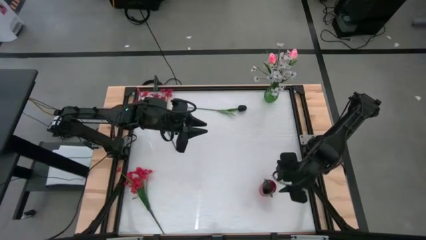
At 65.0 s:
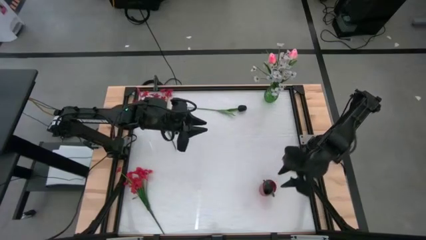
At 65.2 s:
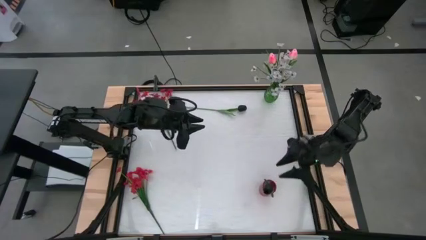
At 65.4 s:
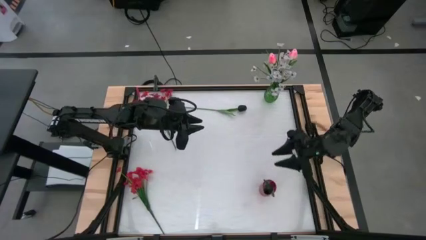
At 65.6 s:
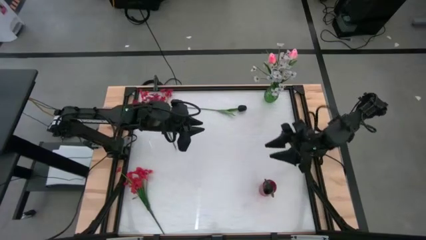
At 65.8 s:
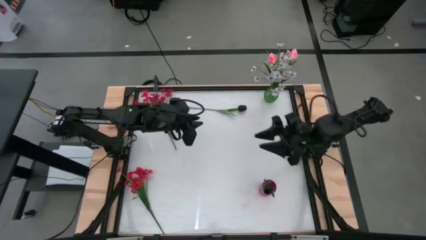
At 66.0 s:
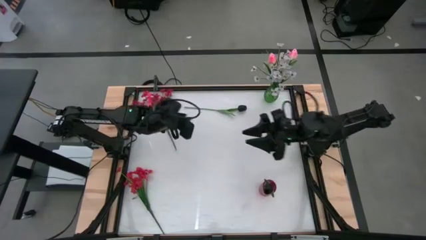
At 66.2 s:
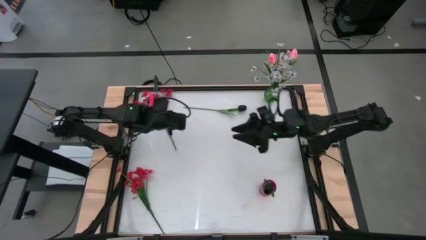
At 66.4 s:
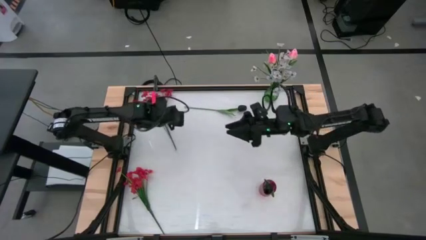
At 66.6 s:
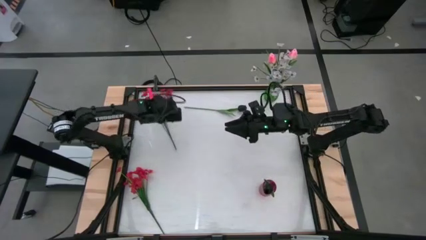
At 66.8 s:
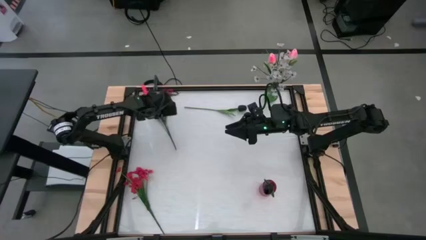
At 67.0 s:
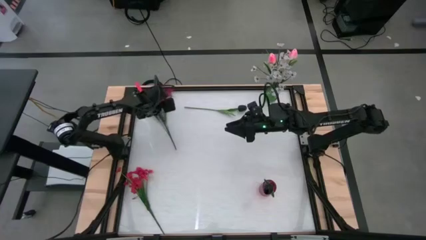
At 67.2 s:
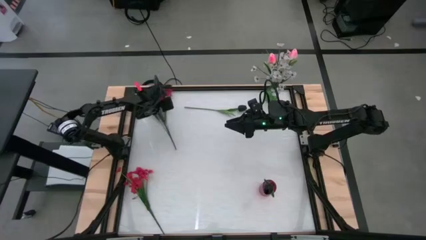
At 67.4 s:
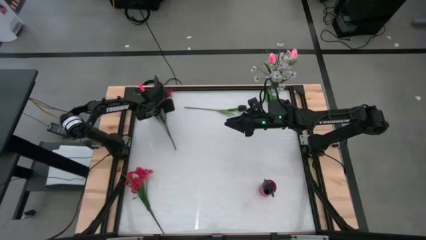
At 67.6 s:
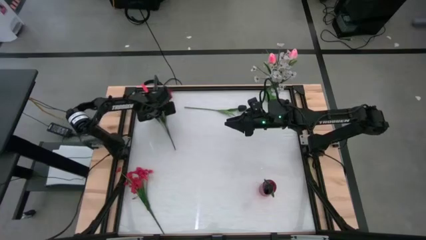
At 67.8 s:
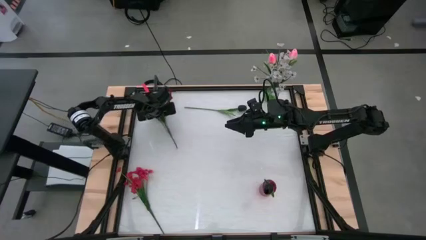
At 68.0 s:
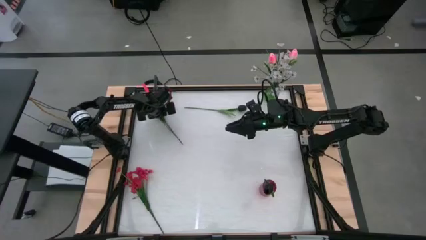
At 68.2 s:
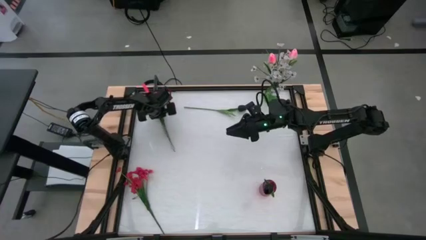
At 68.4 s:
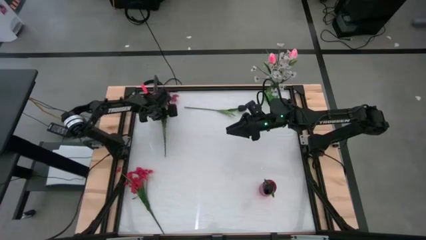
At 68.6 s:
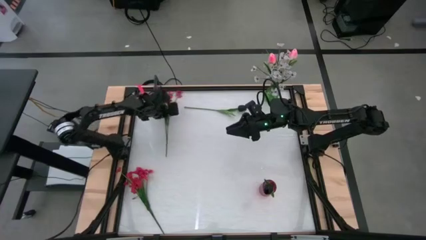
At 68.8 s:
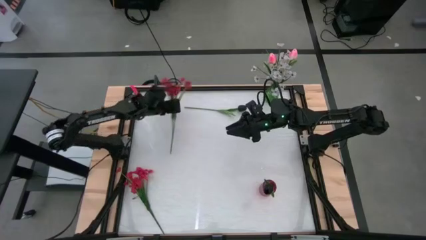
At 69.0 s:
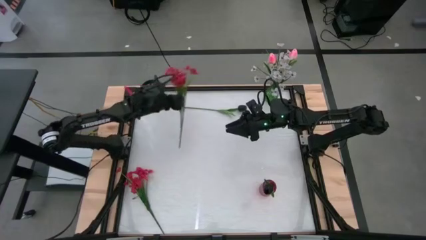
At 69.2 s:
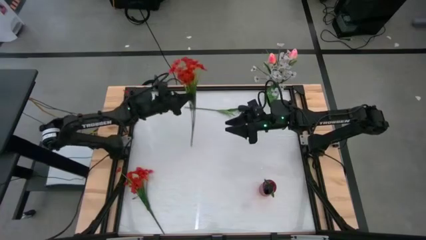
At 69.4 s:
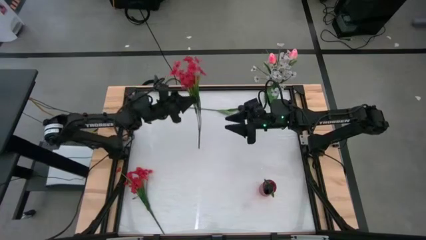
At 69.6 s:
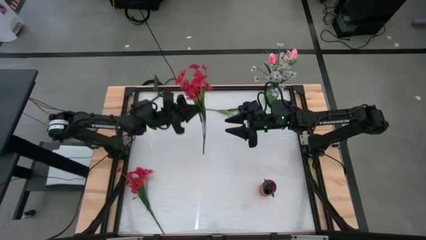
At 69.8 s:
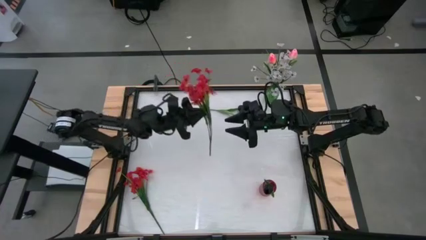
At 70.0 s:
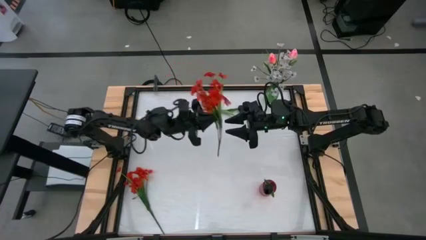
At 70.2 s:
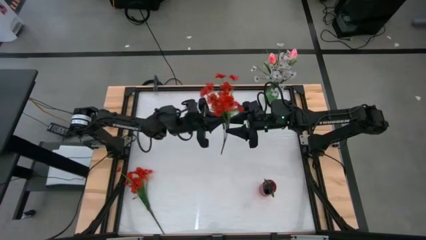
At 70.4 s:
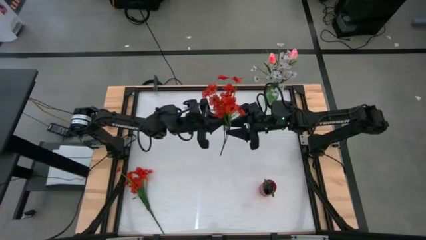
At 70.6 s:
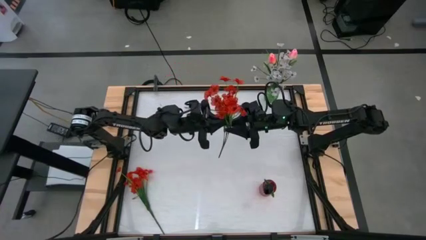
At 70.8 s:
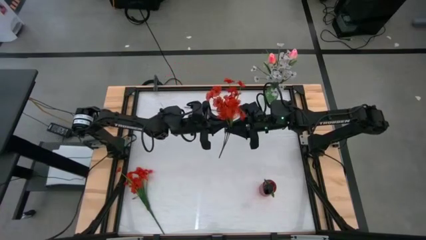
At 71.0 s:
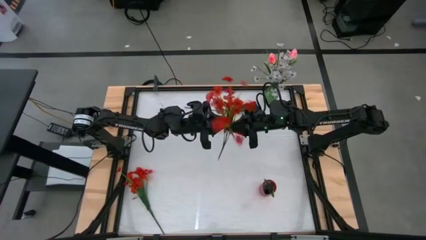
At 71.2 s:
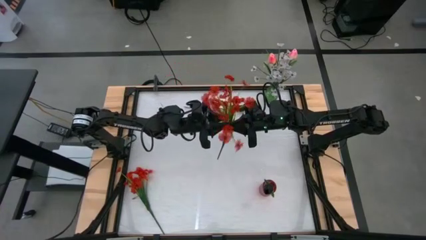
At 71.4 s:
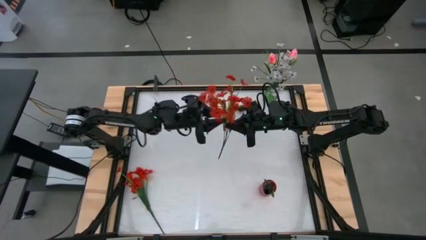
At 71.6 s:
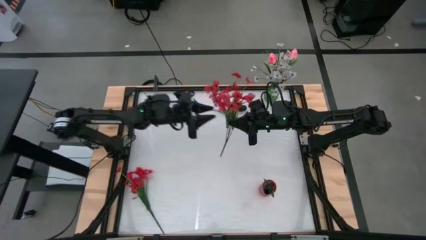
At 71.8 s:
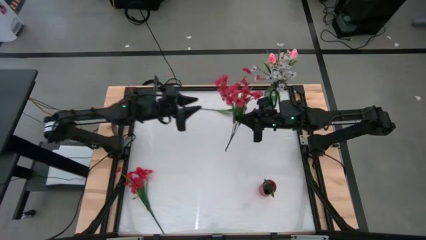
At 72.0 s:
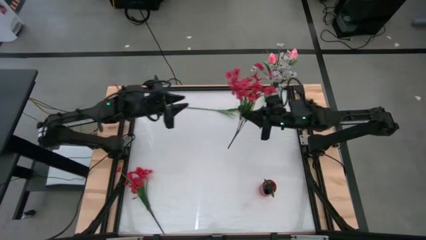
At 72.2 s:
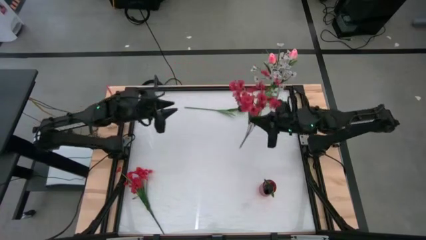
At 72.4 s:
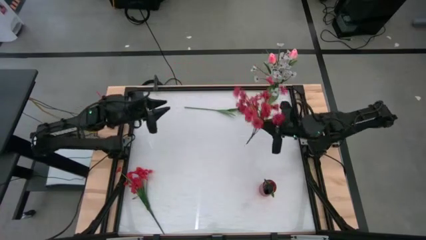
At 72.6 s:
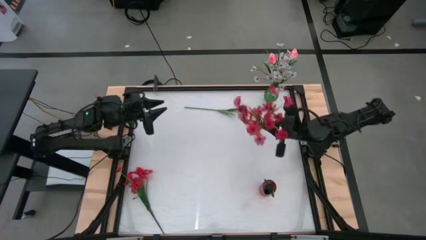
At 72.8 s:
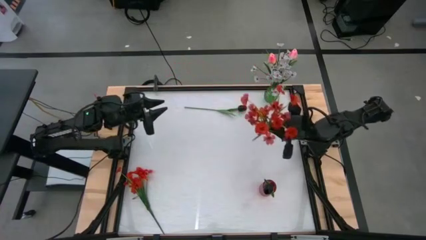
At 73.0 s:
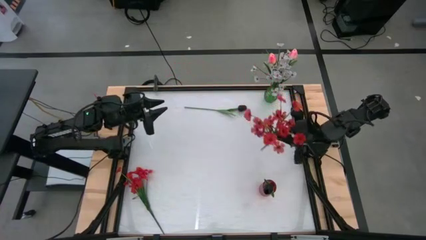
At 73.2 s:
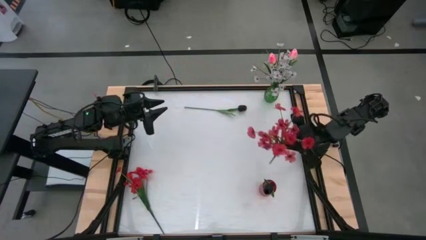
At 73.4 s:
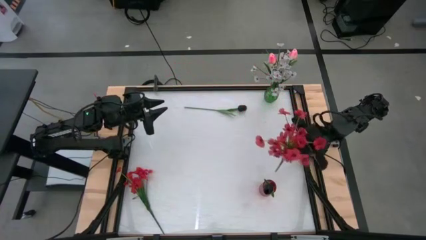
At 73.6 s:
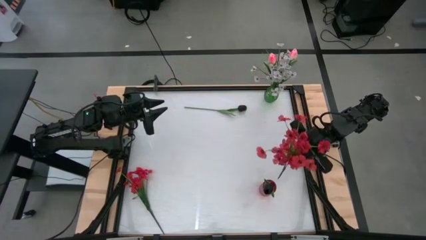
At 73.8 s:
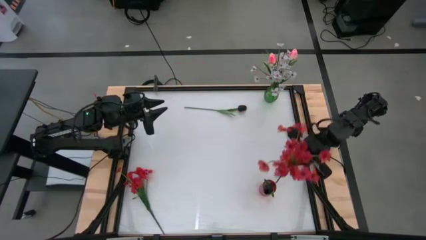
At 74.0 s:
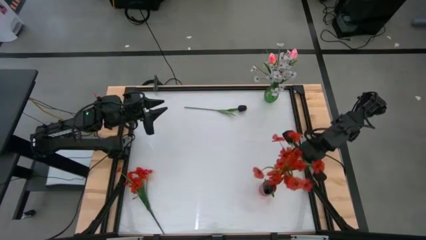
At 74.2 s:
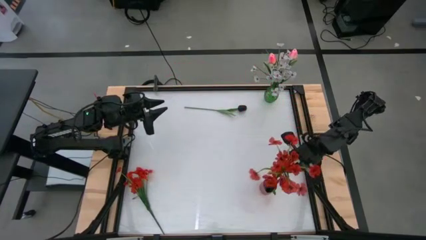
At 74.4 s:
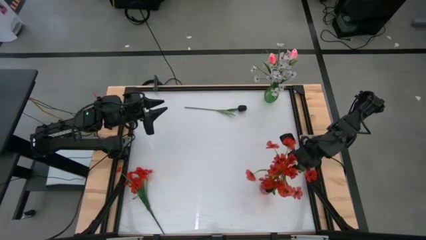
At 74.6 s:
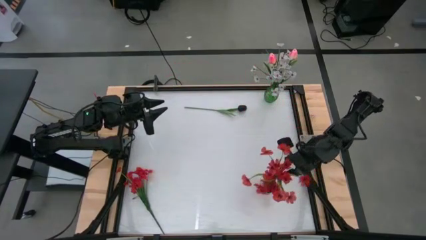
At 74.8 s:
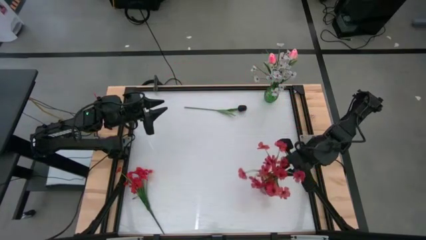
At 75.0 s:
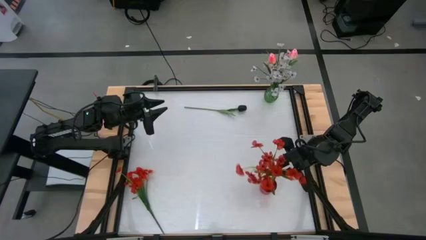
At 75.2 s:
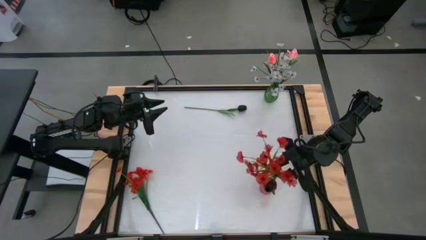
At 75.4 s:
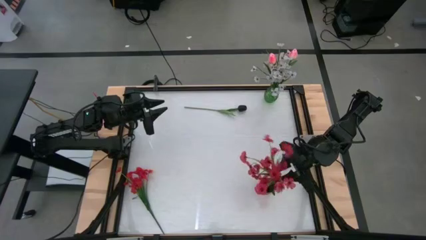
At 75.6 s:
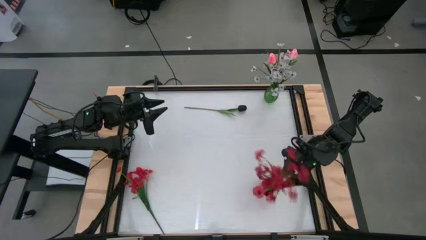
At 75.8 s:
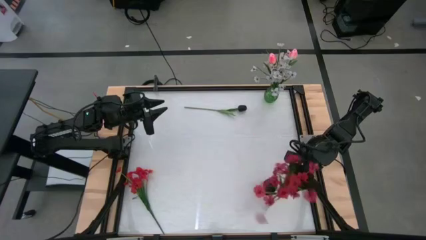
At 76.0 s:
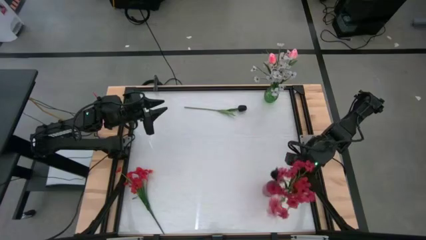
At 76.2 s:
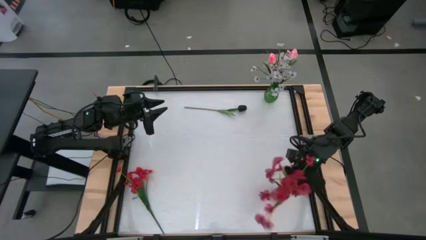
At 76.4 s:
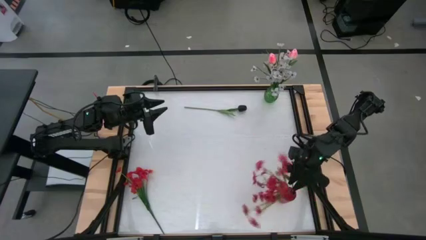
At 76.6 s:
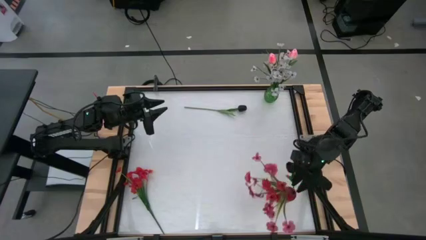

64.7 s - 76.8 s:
Task: Sort flowers into vase by color
Put the top red flower into the red vase
